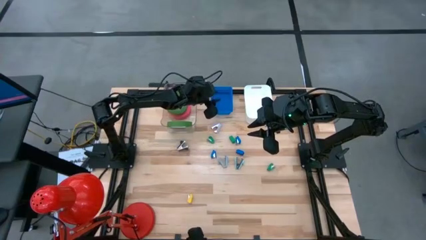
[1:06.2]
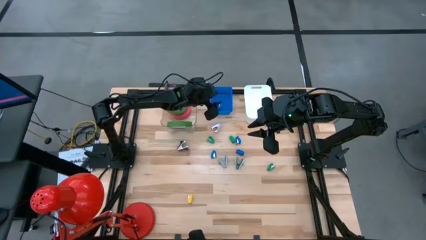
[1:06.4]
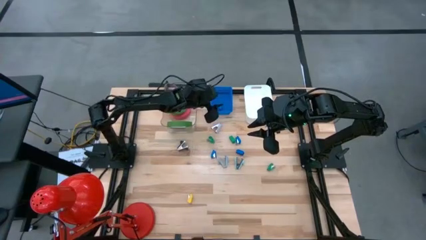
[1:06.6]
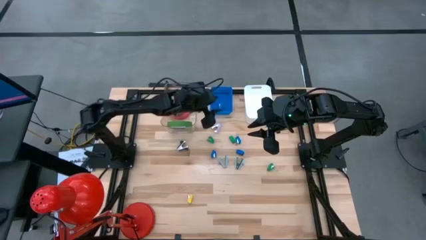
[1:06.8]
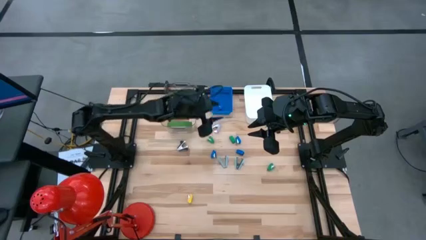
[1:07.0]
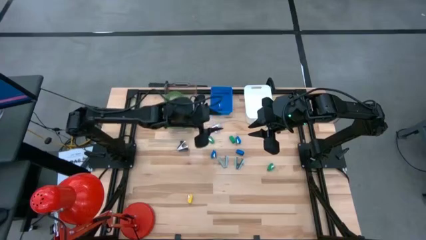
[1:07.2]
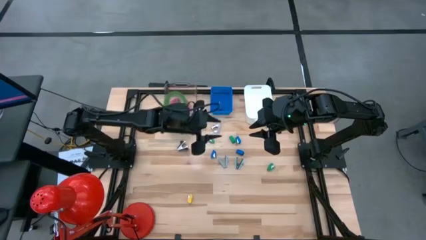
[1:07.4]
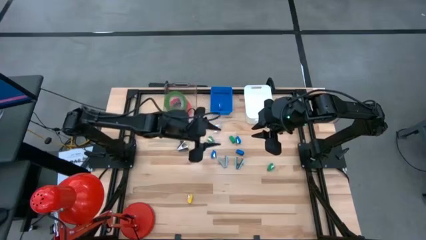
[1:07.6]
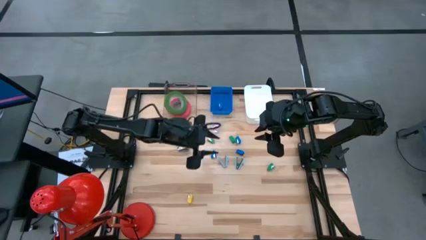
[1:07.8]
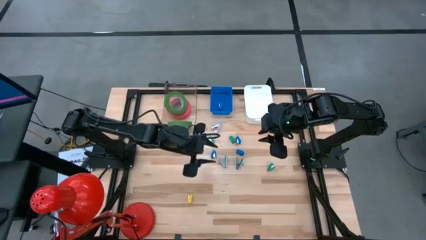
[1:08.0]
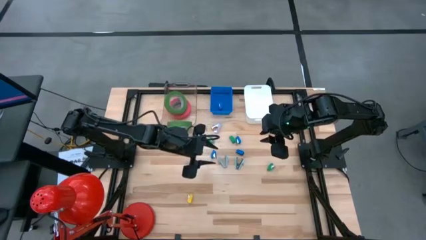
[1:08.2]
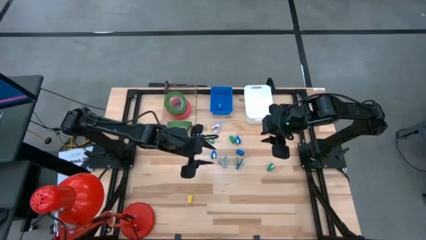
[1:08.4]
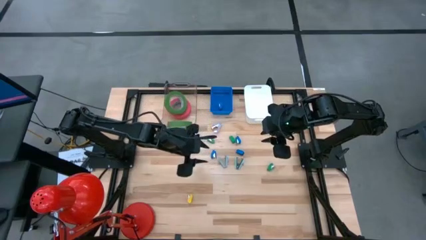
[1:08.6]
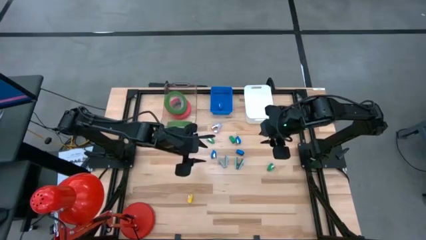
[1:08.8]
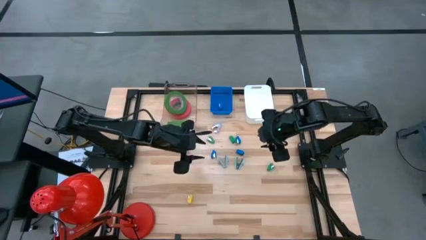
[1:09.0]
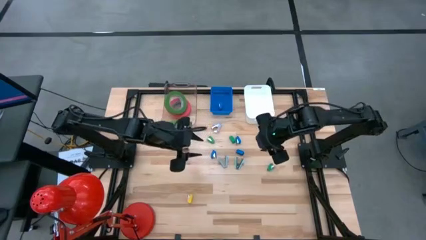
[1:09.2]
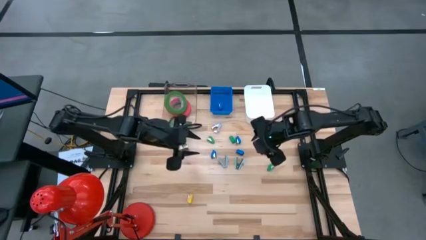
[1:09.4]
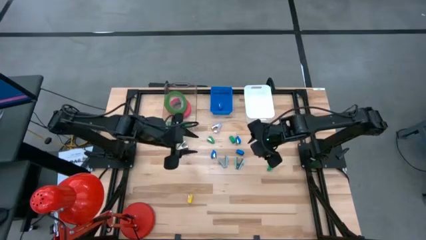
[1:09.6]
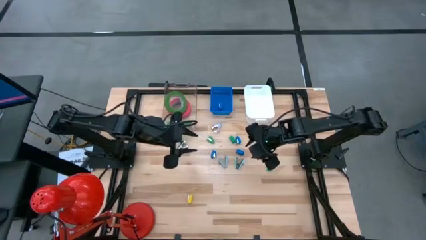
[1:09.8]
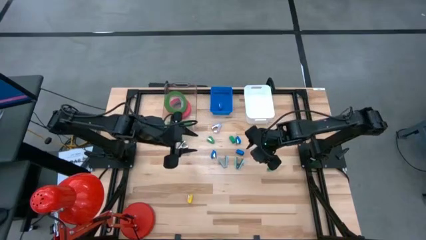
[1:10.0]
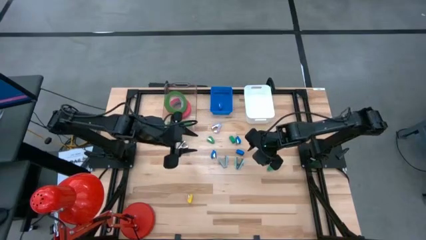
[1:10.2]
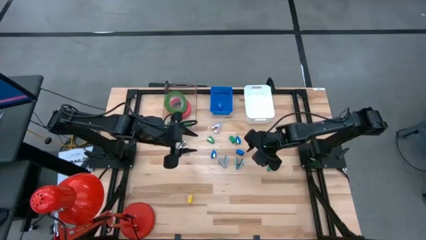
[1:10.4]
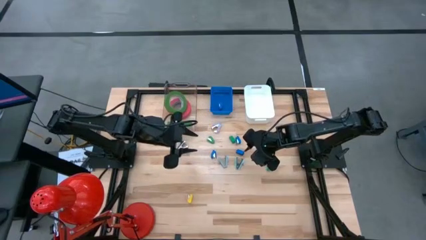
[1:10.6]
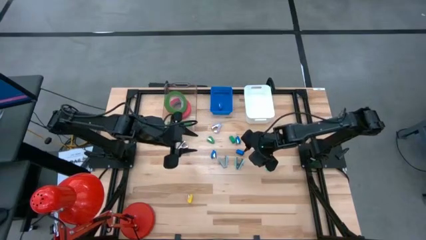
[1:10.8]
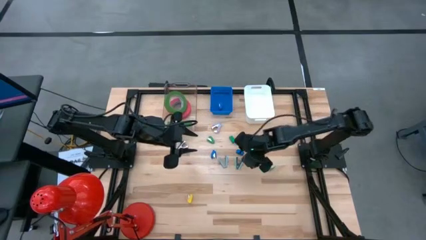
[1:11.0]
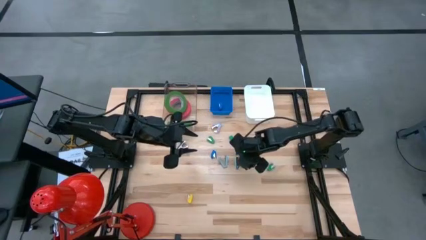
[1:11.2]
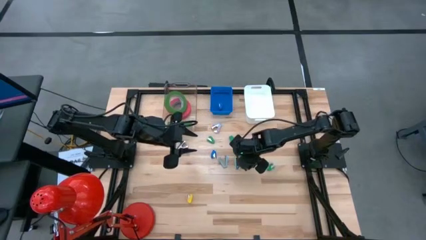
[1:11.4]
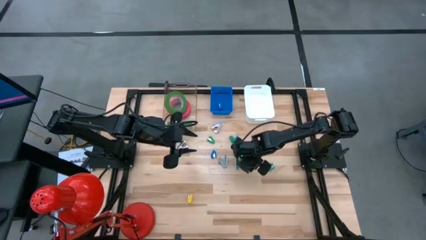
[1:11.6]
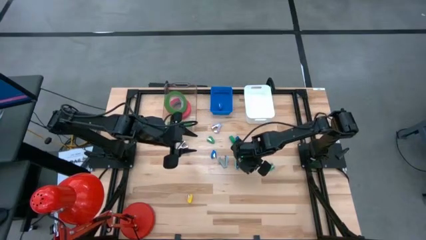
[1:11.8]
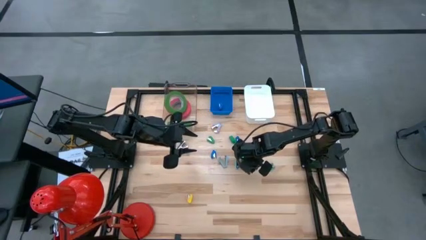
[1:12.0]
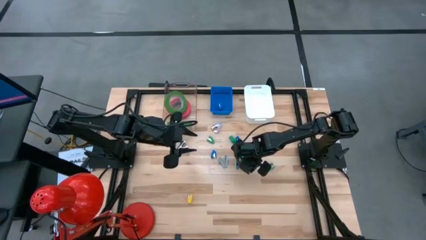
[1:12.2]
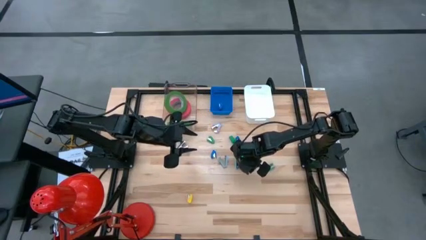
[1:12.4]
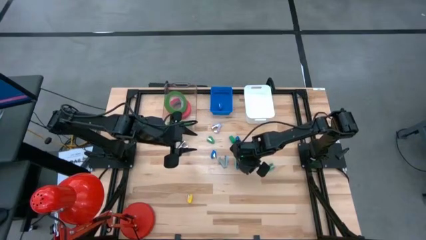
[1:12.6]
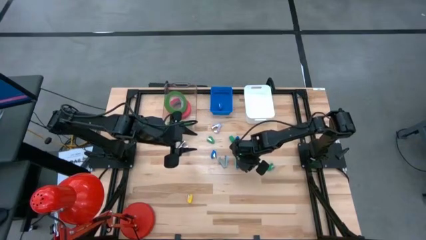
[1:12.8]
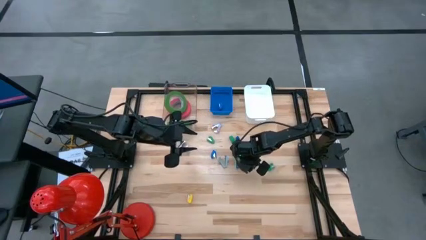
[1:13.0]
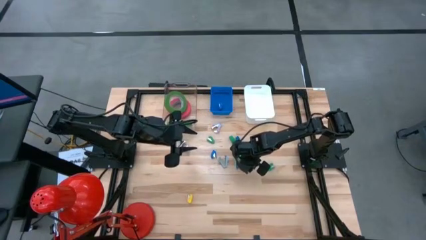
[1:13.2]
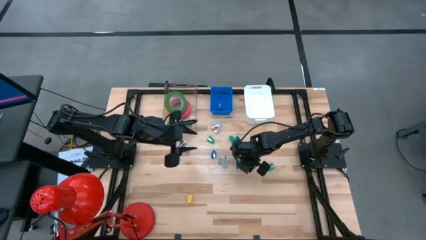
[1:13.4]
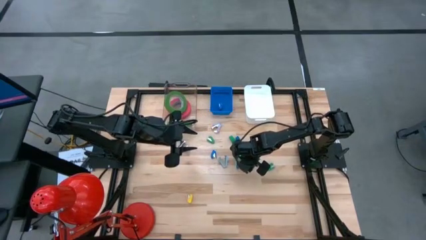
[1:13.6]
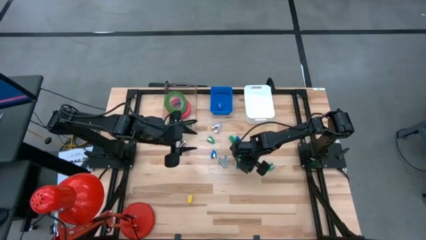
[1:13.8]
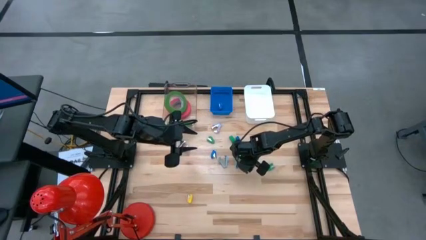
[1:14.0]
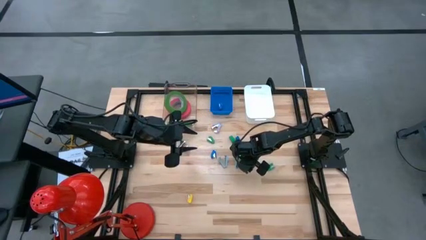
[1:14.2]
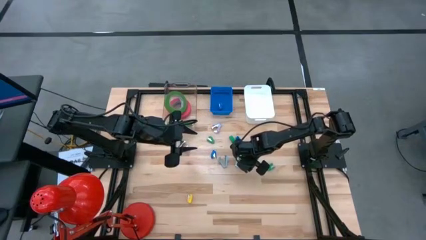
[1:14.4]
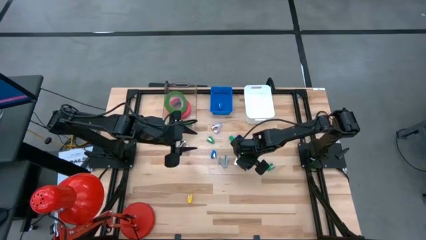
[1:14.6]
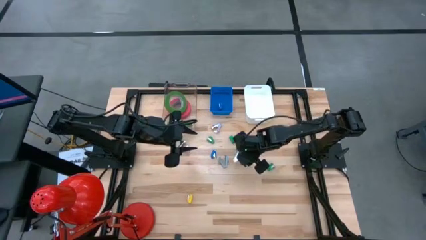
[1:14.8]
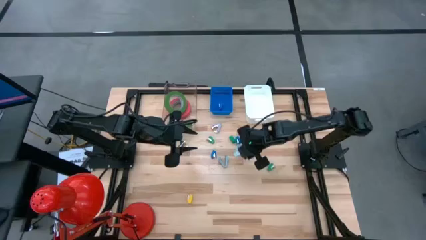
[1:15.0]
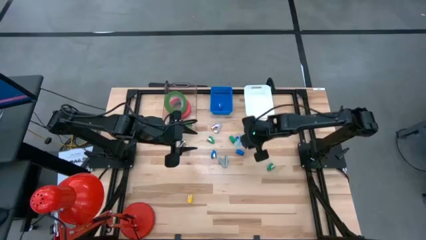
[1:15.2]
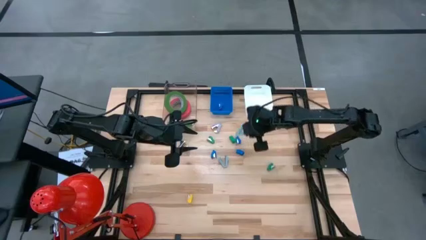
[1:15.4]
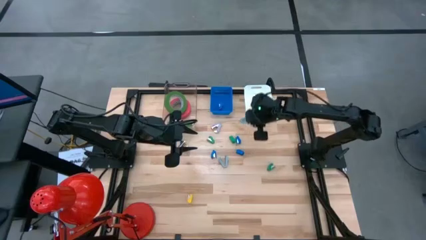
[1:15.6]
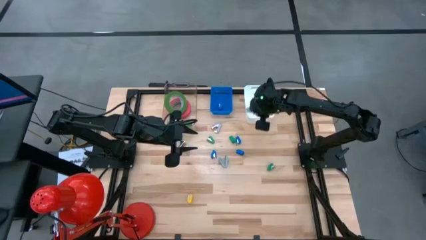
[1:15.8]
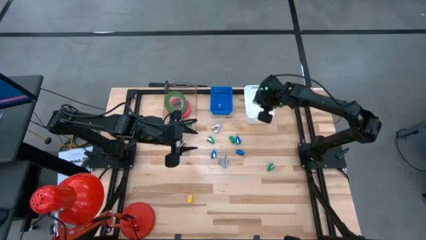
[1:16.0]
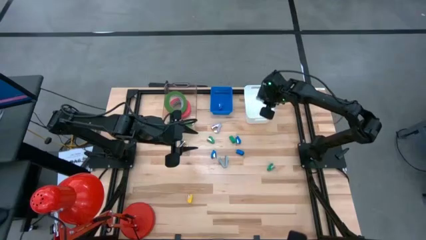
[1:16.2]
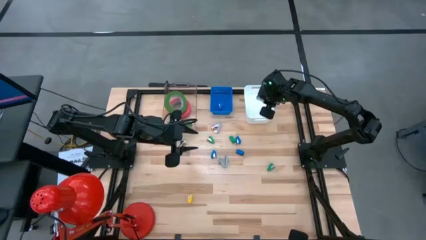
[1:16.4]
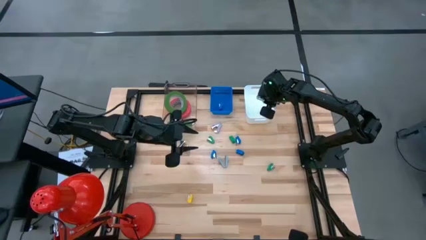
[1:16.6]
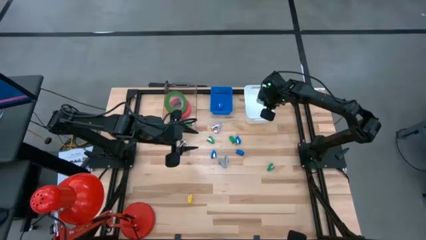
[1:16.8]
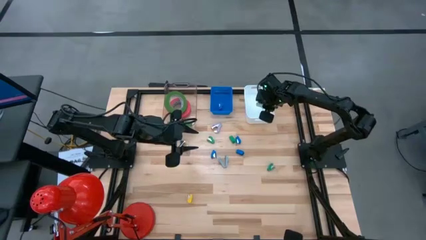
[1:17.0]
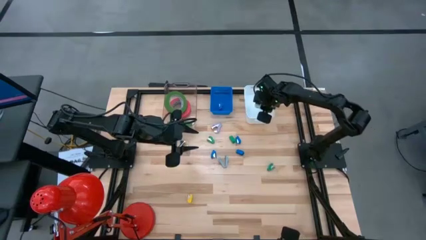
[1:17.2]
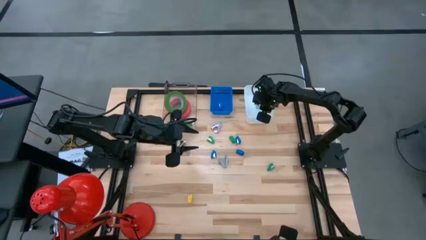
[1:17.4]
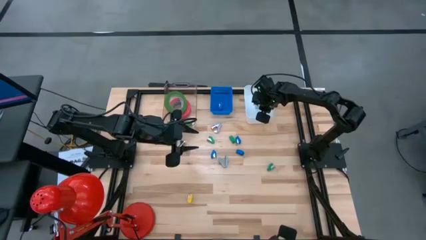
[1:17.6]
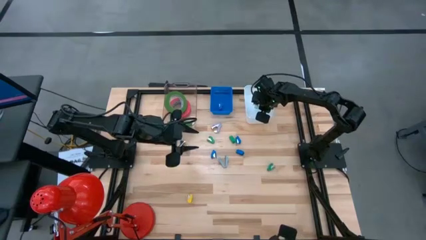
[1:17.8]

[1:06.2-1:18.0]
Task: Pick and place Stapler, Stapler remover, tape
Put the light blue stapler remover into the white bin

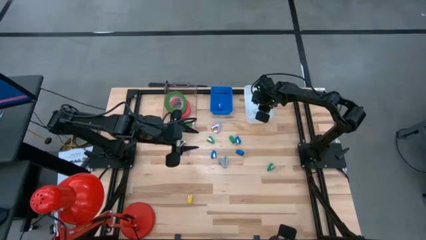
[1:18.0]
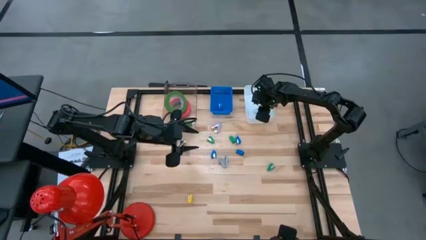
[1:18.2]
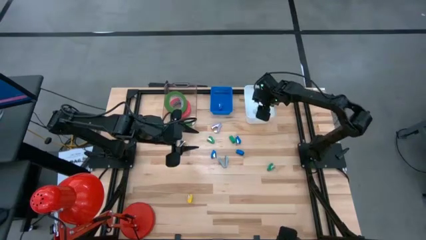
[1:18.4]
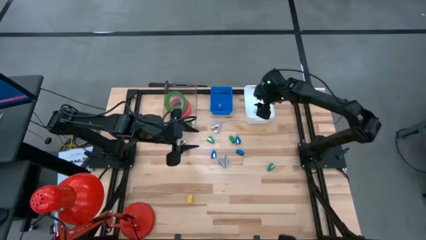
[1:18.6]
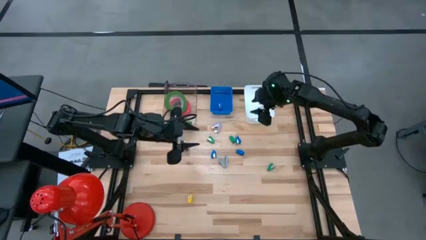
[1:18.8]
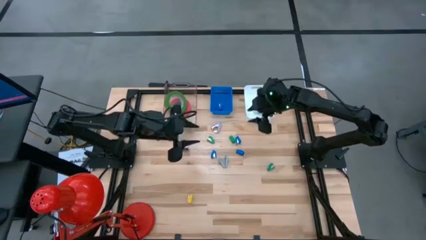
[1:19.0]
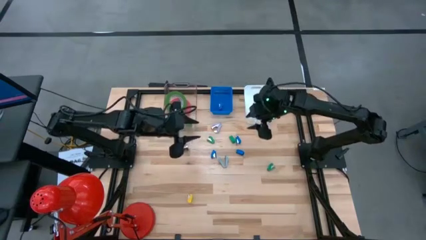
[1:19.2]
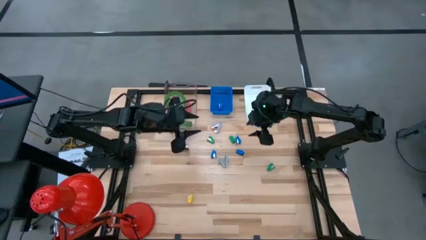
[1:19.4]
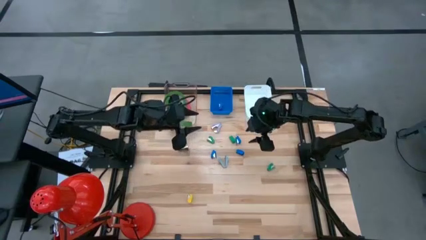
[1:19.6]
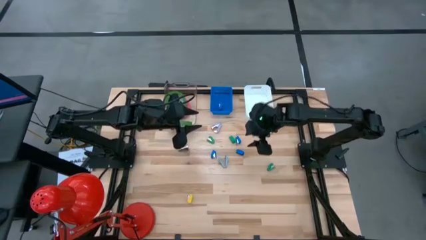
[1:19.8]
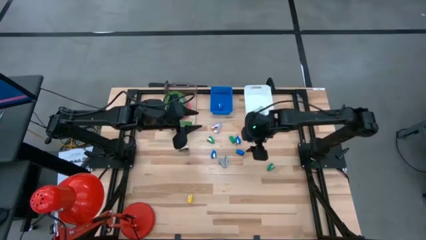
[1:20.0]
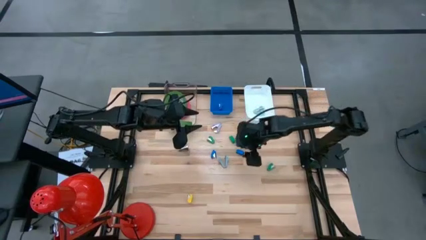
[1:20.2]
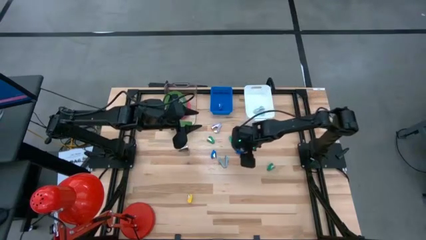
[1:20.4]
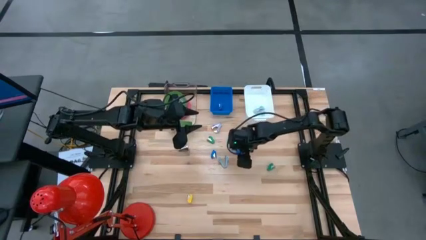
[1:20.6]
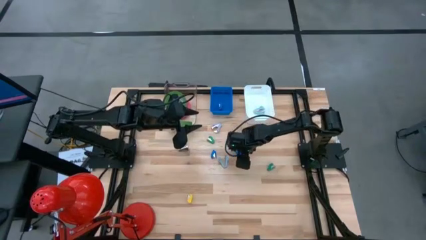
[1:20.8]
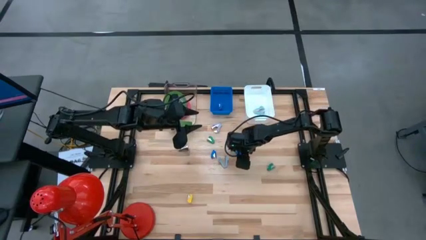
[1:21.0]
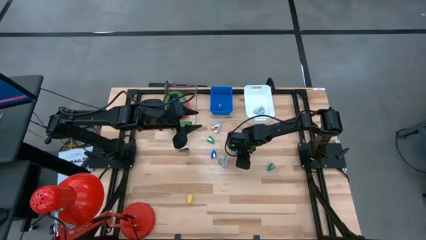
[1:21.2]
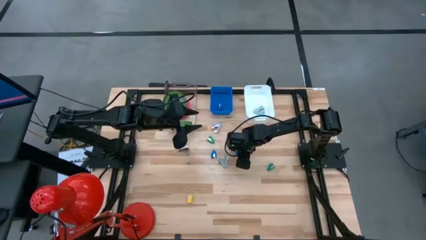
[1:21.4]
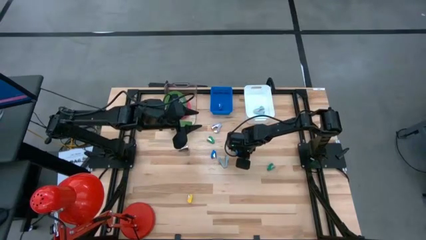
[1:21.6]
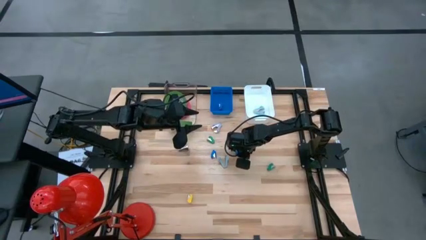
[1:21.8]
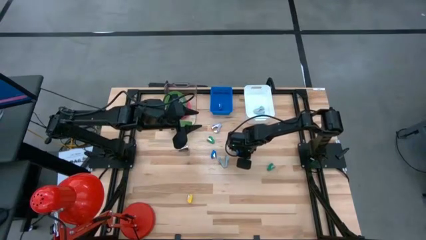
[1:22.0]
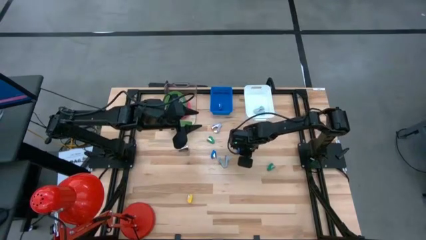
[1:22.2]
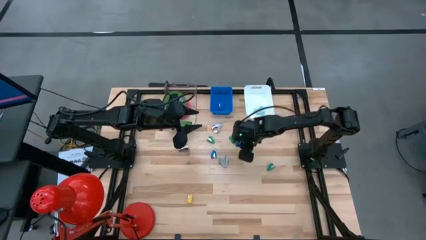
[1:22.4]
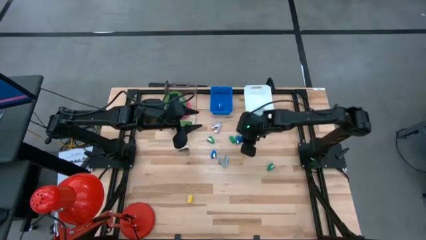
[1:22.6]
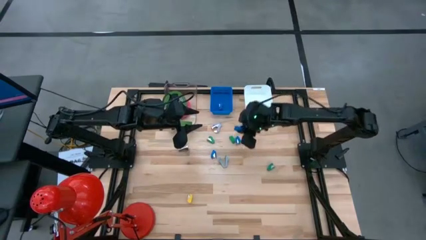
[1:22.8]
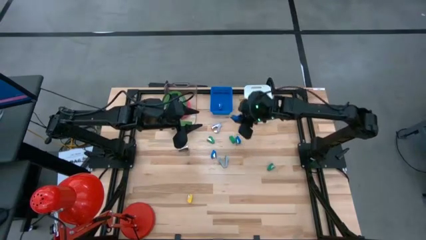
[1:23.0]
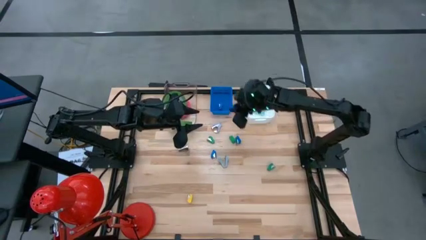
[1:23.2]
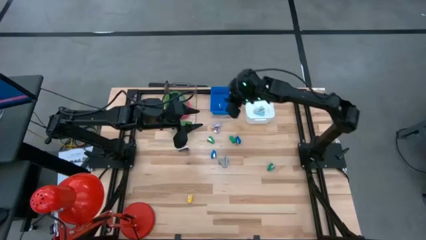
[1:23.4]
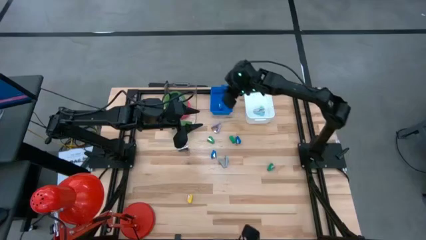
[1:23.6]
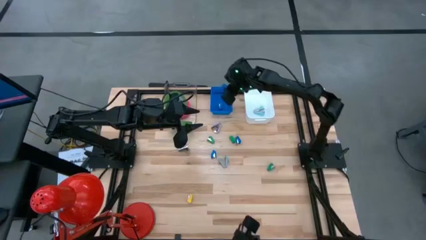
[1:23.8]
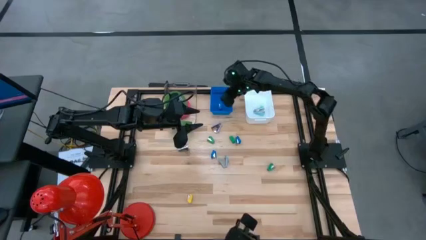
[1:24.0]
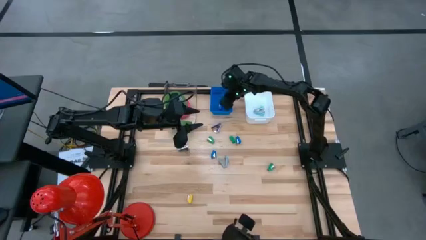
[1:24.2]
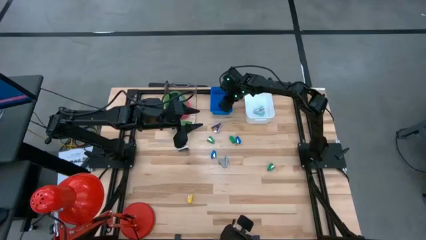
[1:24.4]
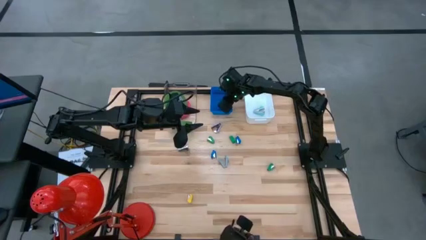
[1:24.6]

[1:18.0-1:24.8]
Put the blue stapler into the blue bin
